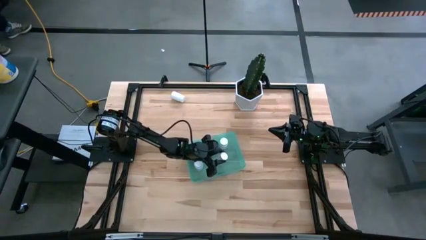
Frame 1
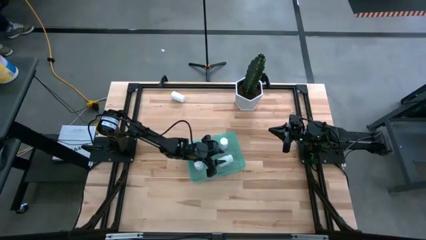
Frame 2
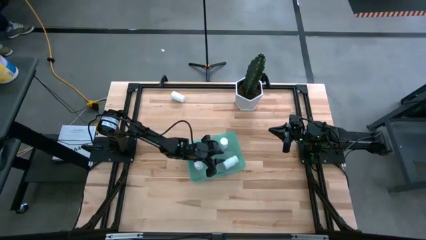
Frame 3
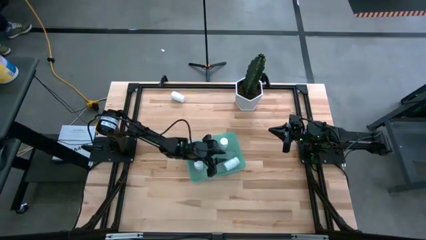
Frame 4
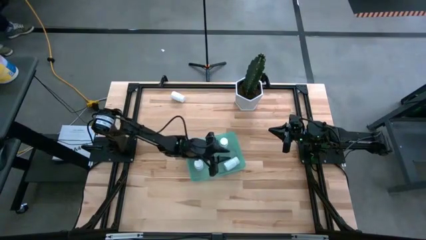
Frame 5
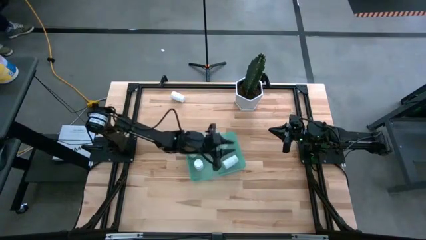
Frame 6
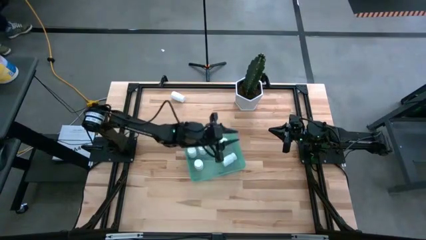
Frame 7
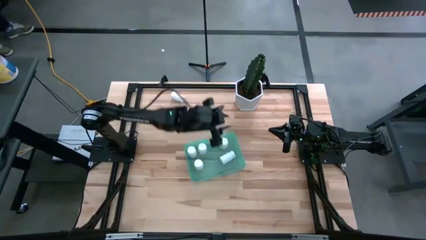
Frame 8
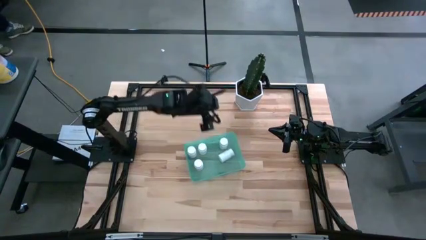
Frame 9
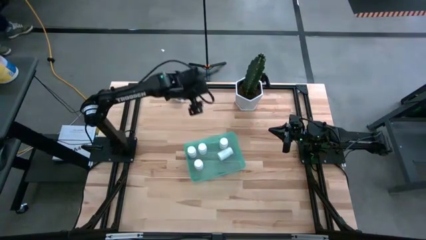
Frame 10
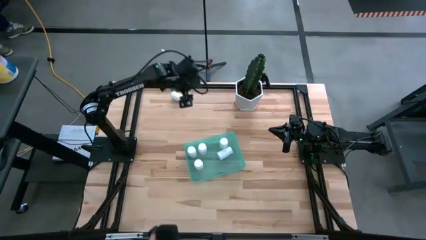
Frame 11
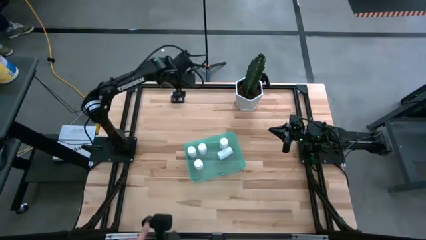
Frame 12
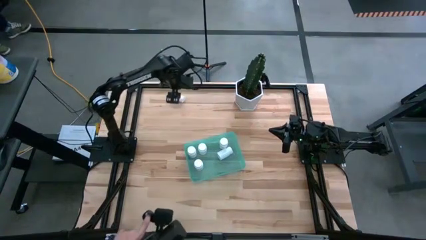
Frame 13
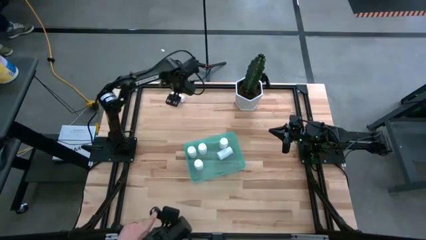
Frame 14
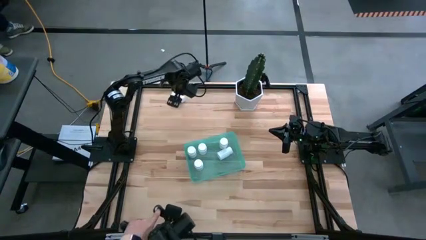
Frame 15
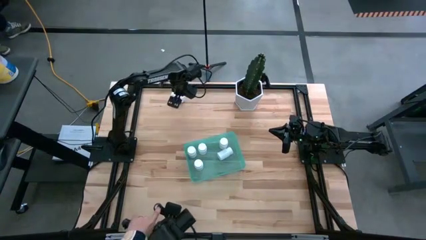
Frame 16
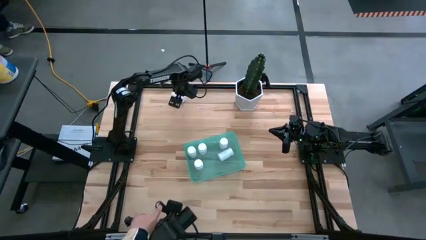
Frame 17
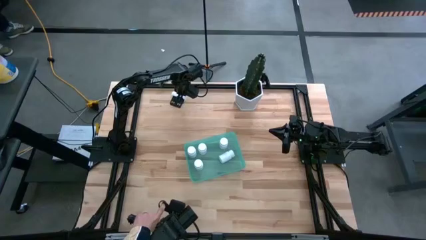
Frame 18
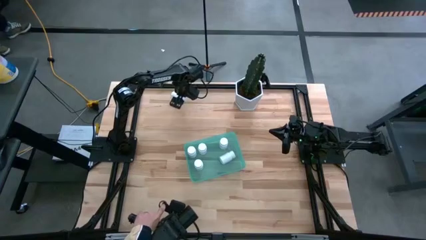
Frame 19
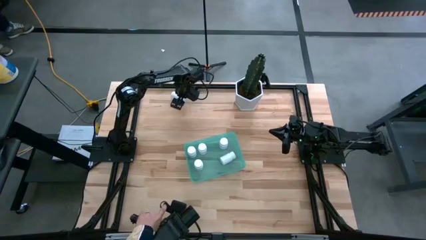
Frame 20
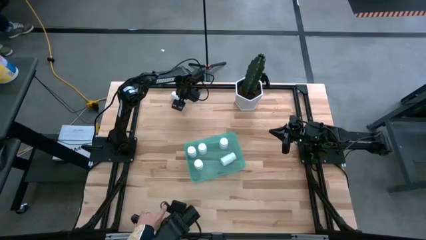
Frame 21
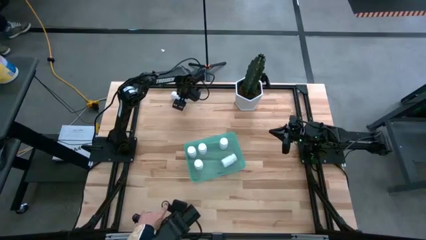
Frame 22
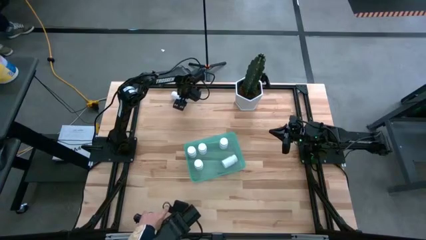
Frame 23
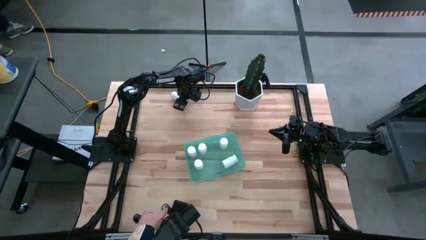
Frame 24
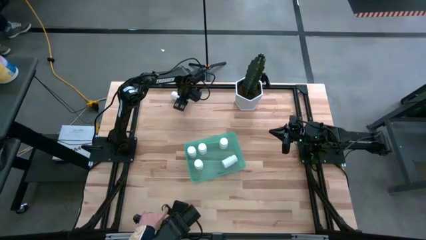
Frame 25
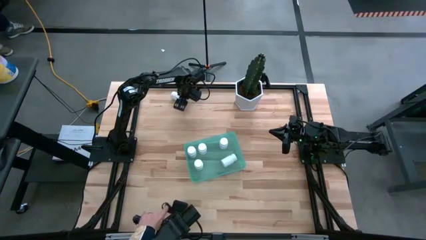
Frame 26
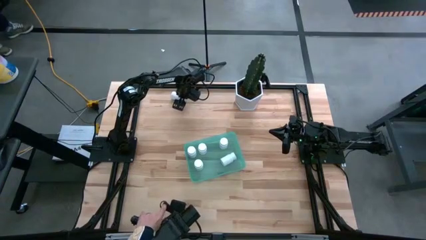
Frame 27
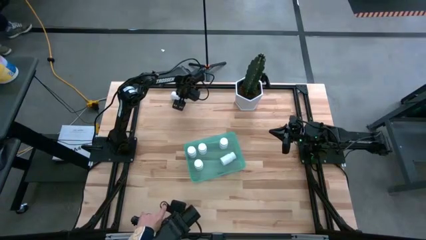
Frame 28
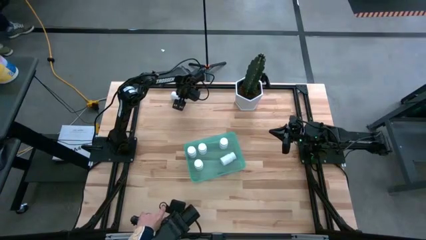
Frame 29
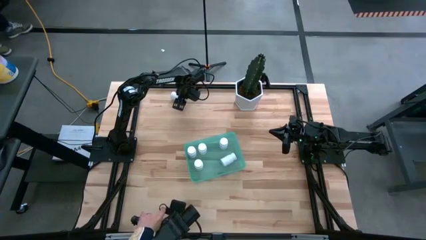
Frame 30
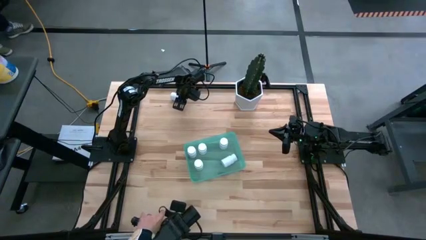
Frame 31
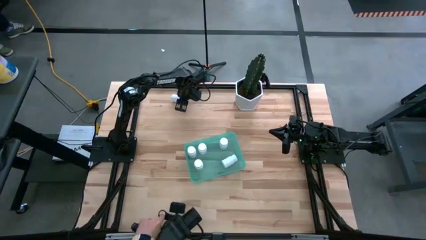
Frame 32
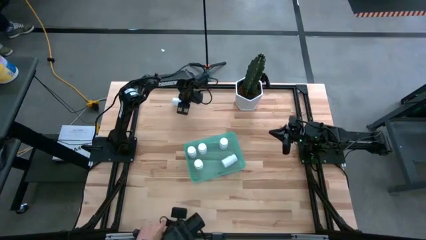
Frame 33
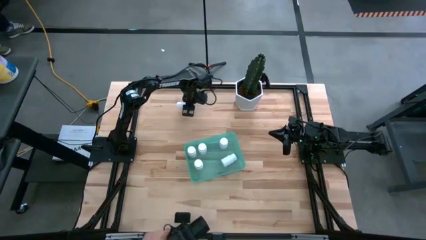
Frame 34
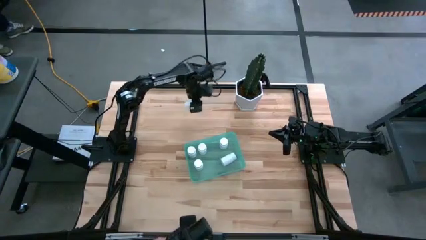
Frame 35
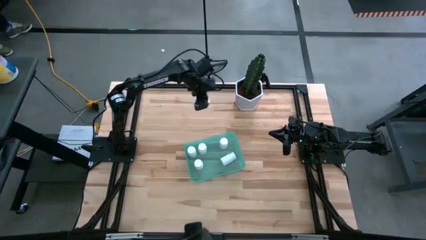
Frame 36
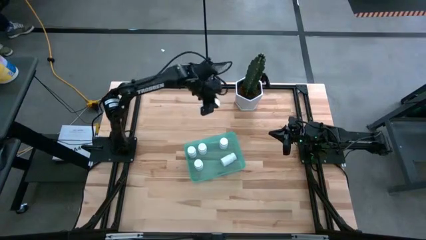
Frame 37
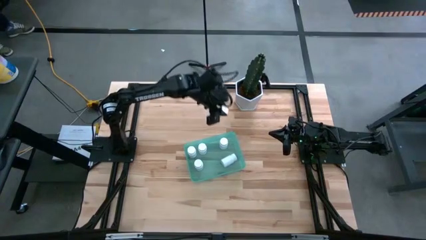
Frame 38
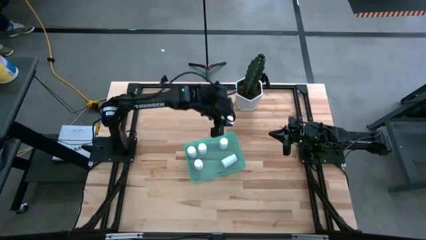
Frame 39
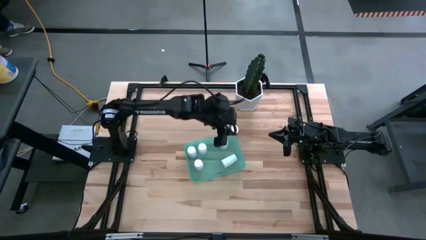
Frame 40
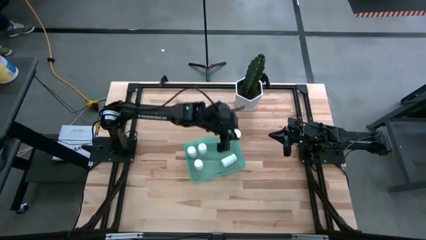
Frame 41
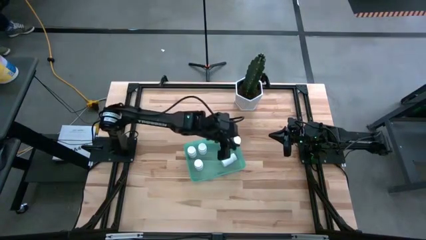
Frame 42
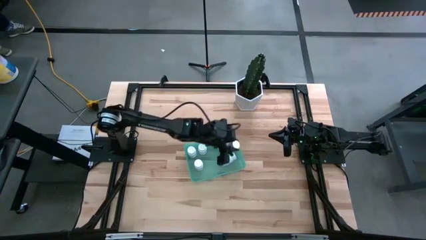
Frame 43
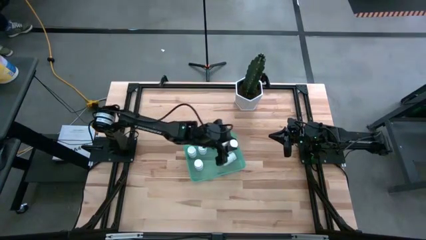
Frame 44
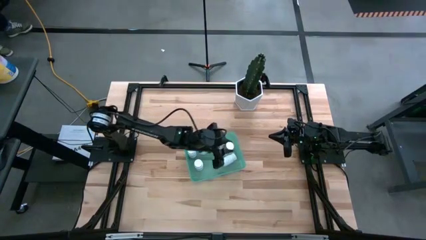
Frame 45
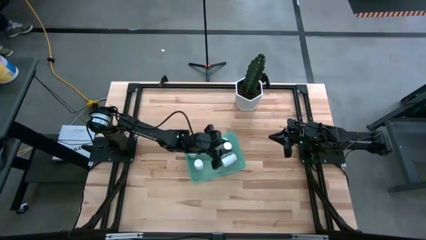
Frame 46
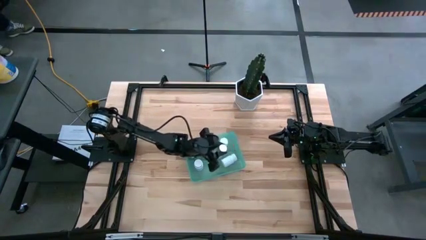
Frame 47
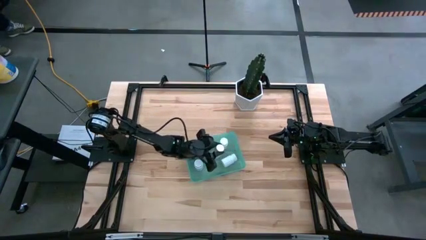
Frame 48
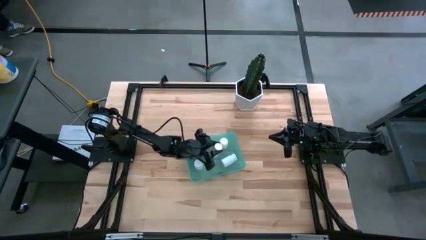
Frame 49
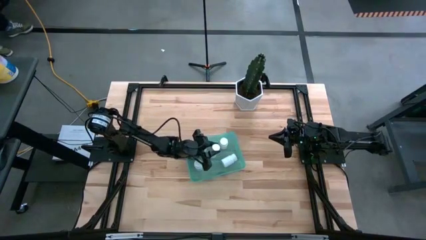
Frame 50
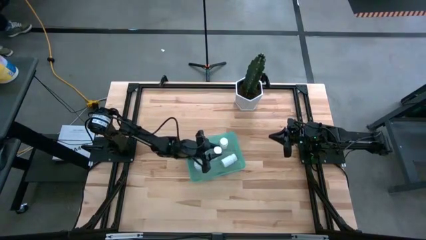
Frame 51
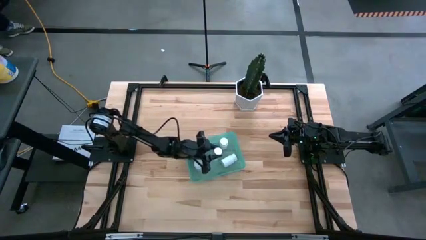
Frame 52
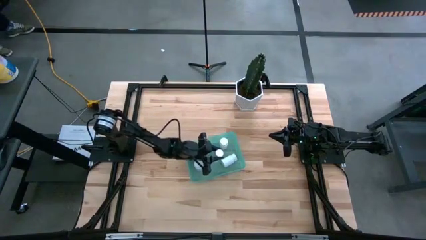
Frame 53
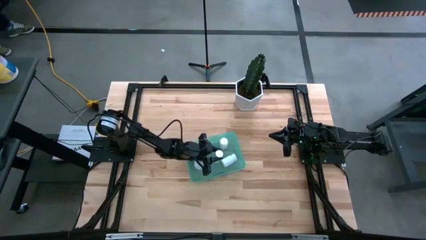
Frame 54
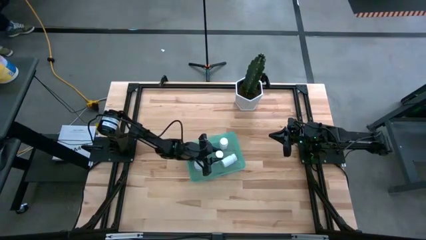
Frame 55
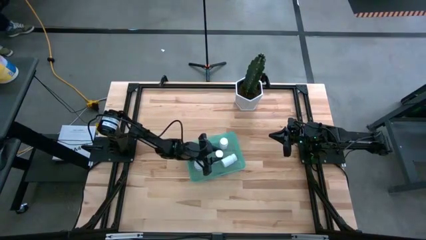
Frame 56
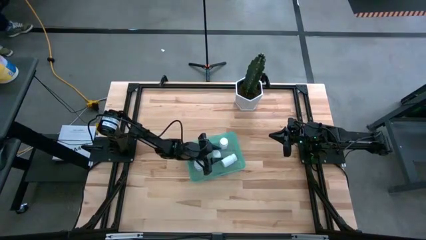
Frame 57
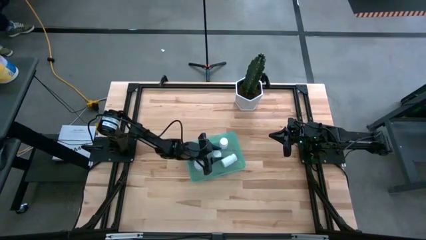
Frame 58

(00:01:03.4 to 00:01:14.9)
Task: Pick and place pill bottles into a basket
Put the white pill bottle into the green bin

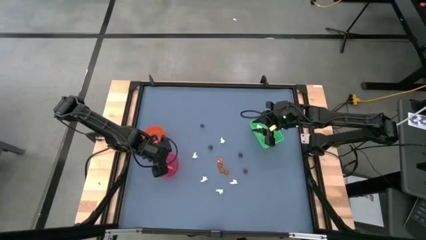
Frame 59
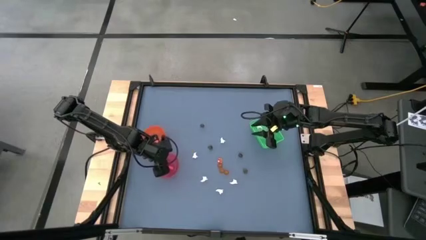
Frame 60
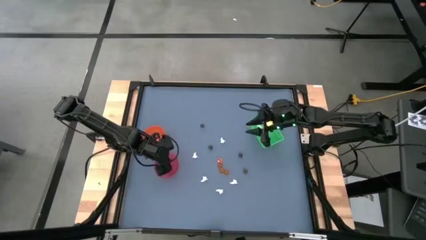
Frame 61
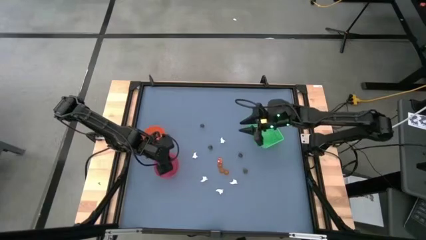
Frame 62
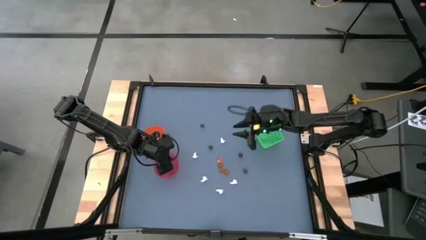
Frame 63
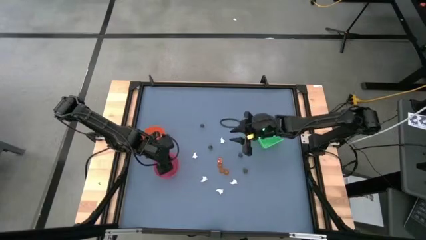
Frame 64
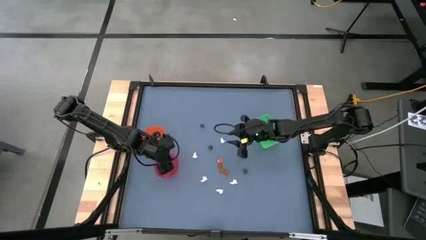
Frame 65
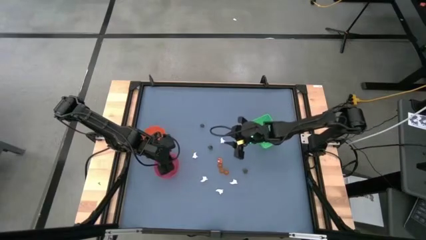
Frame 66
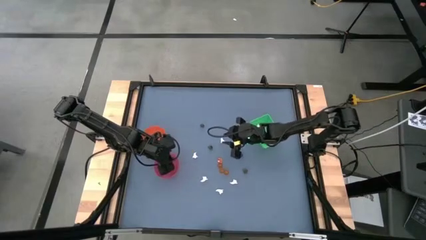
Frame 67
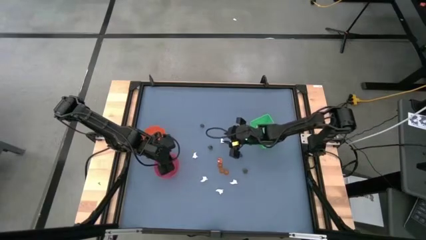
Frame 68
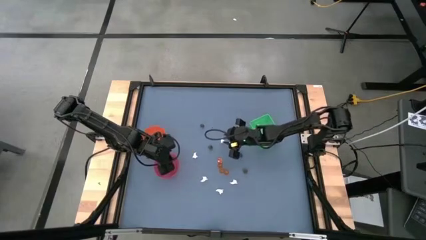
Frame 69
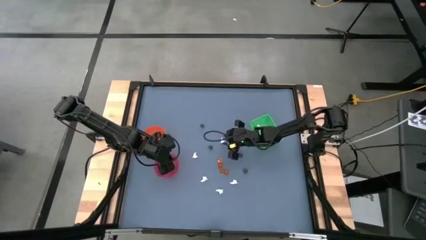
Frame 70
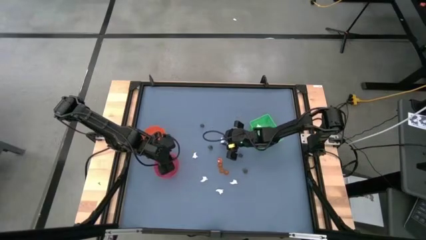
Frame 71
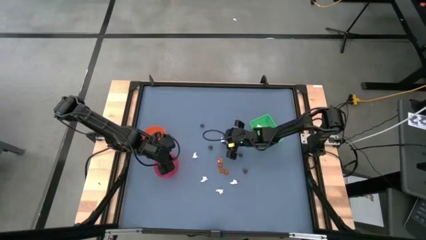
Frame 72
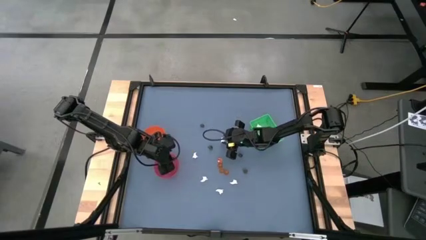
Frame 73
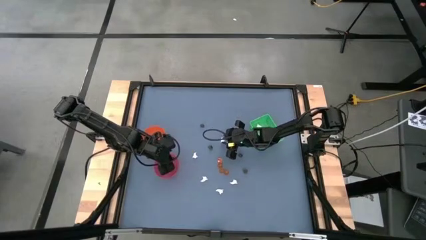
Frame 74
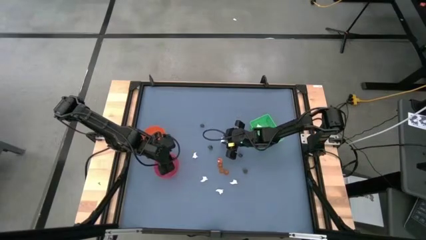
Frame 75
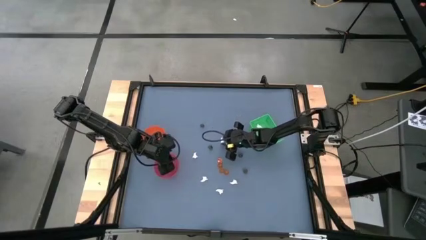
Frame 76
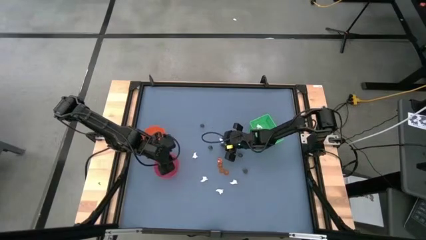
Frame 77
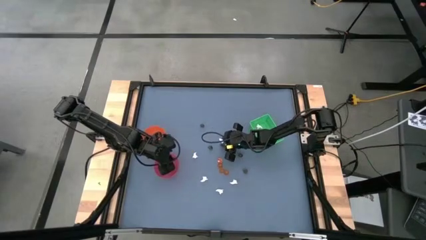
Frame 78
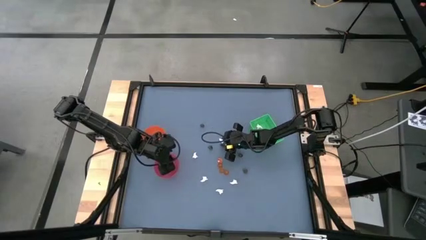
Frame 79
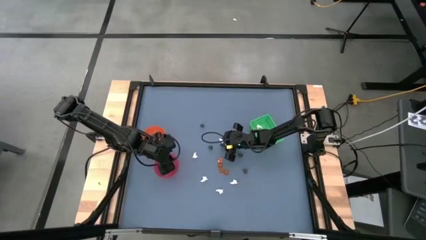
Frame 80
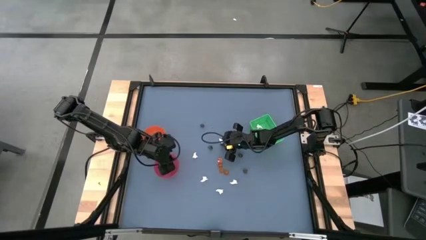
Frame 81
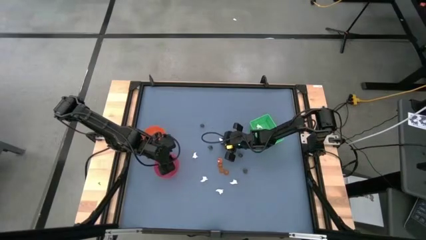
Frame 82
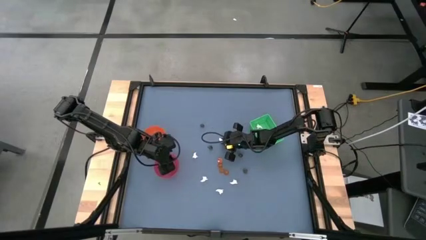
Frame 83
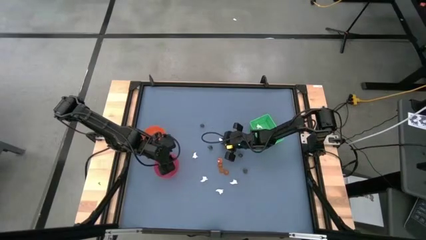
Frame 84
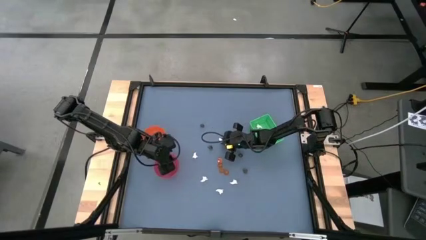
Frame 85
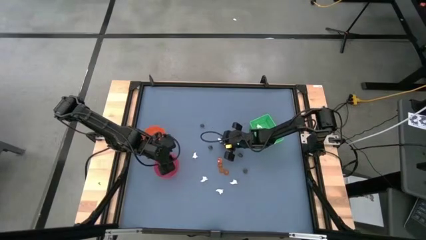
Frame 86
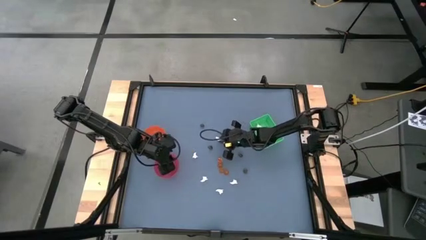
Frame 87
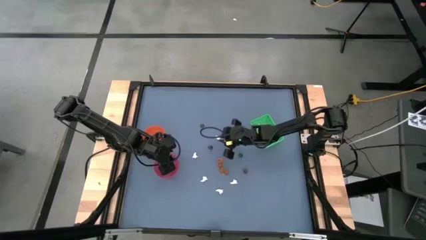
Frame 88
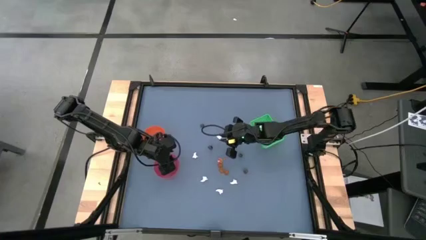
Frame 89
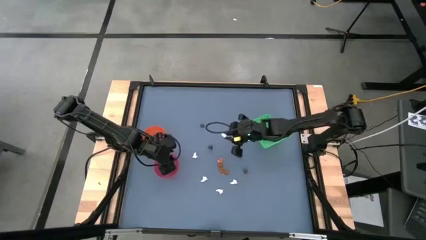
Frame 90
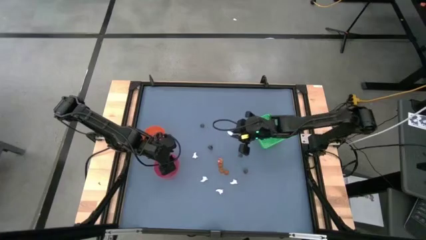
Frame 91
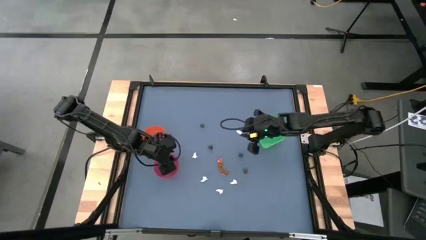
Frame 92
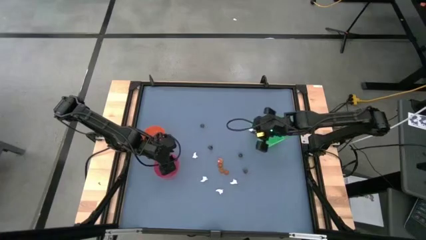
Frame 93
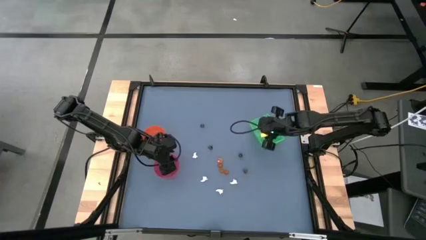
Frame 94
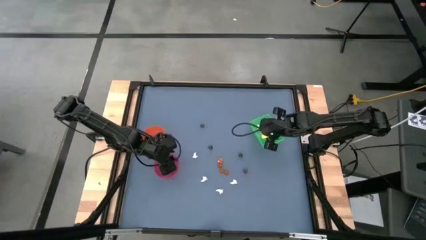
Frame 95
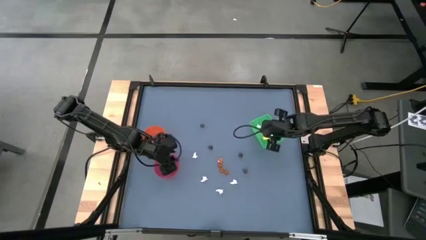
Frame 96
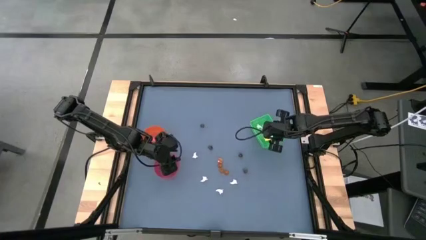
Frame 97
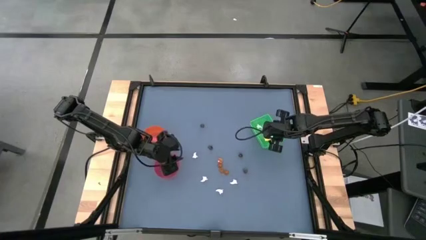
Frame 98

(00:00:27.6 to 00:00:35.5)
Task: Sort Halloween decoration
Put the white ghost toy into the green bin
